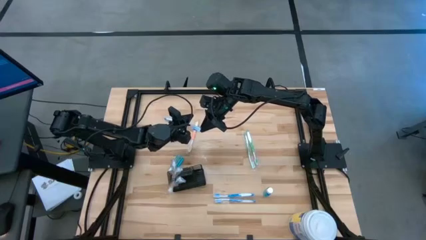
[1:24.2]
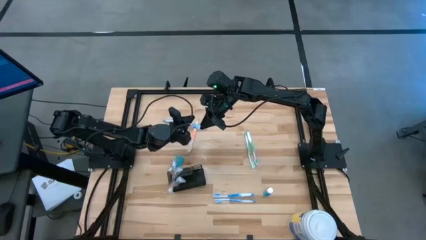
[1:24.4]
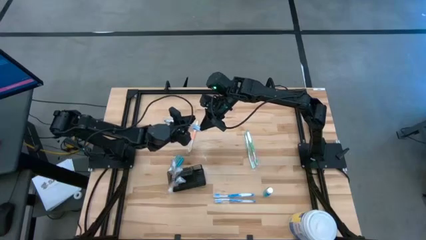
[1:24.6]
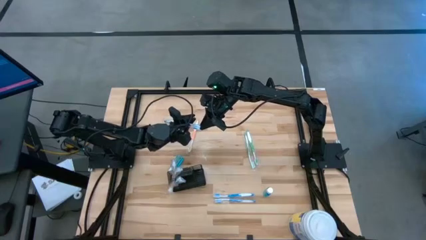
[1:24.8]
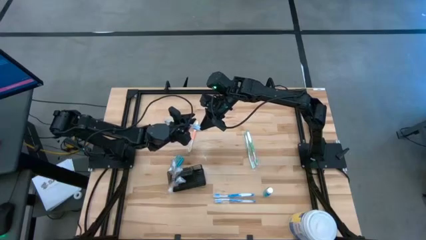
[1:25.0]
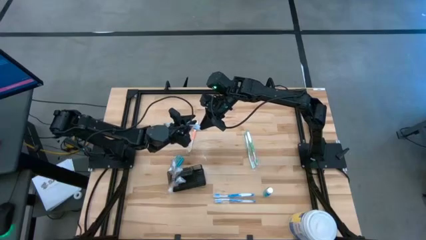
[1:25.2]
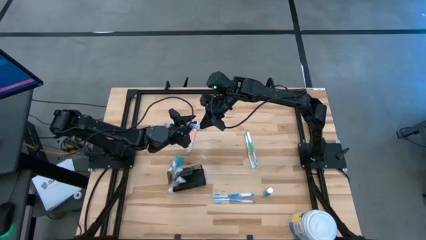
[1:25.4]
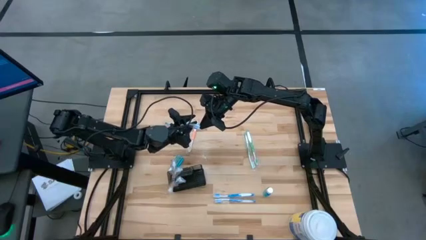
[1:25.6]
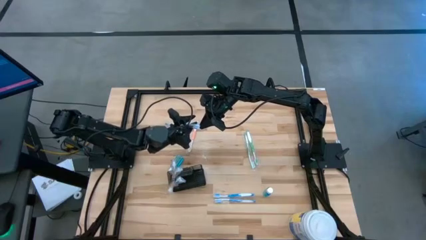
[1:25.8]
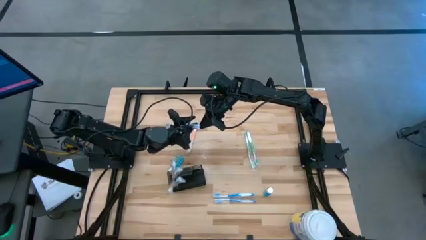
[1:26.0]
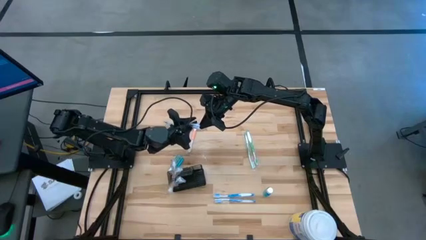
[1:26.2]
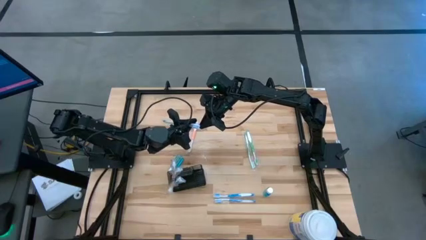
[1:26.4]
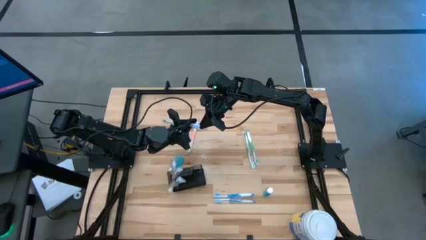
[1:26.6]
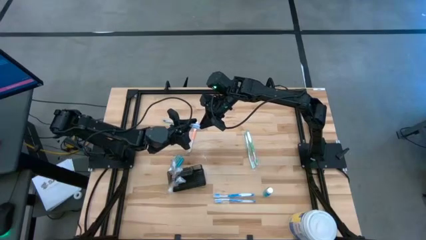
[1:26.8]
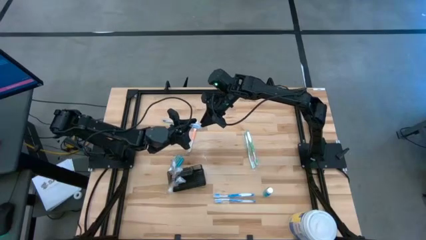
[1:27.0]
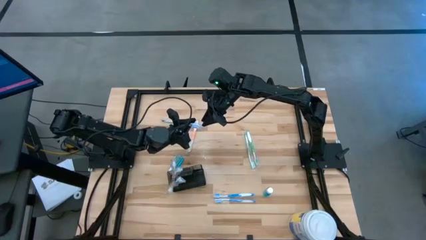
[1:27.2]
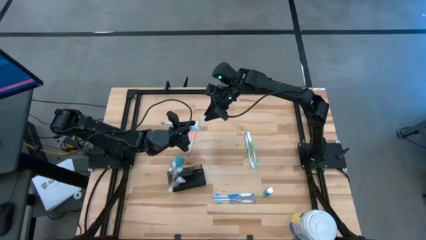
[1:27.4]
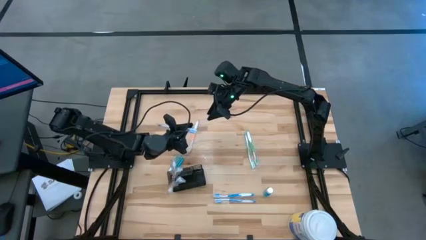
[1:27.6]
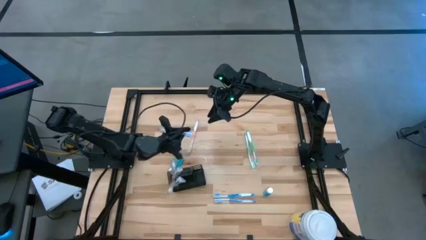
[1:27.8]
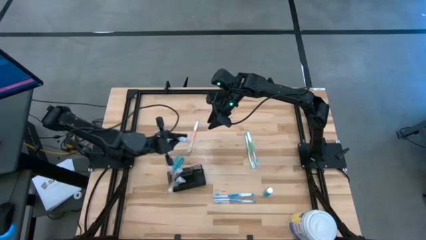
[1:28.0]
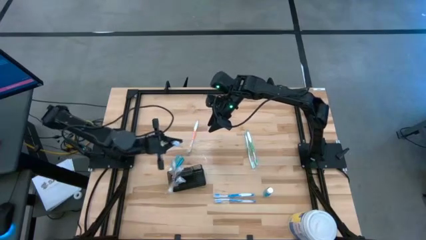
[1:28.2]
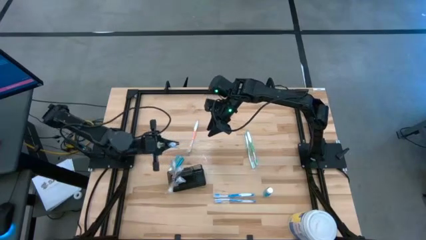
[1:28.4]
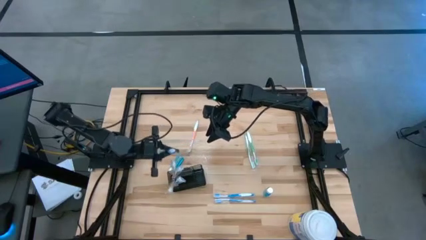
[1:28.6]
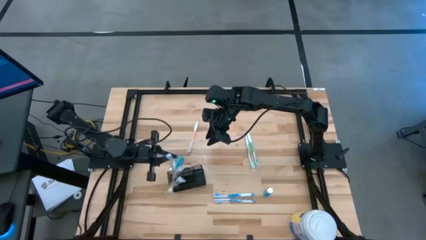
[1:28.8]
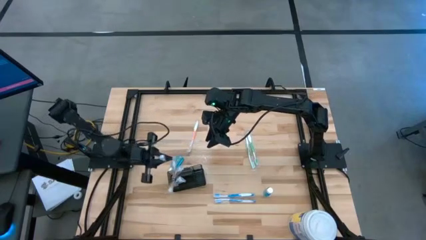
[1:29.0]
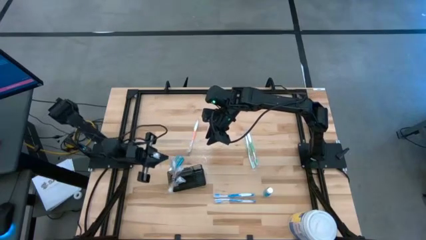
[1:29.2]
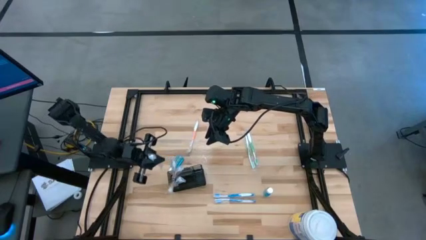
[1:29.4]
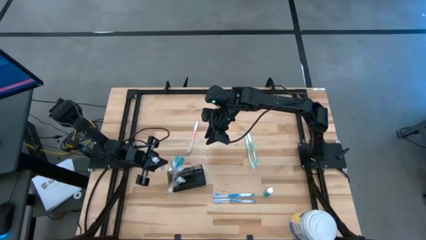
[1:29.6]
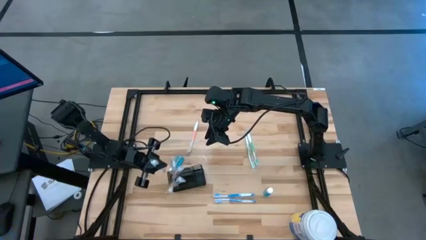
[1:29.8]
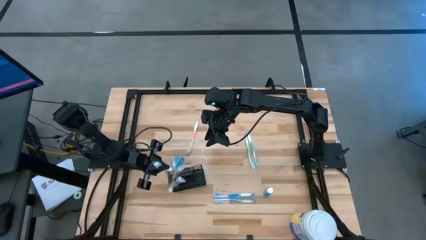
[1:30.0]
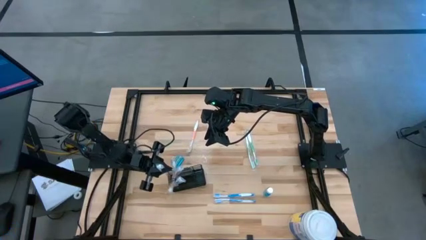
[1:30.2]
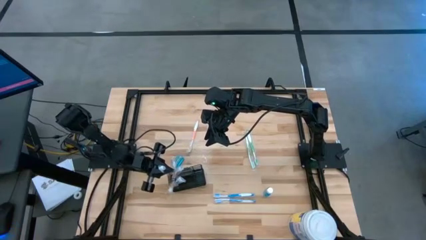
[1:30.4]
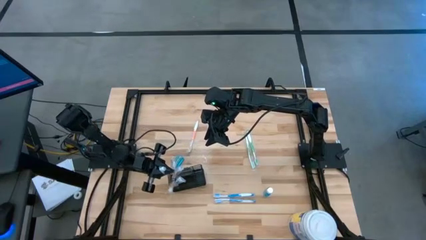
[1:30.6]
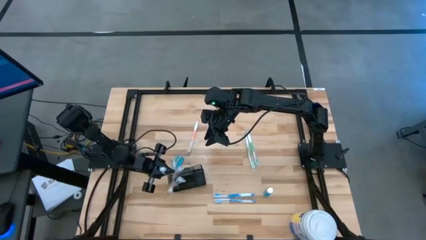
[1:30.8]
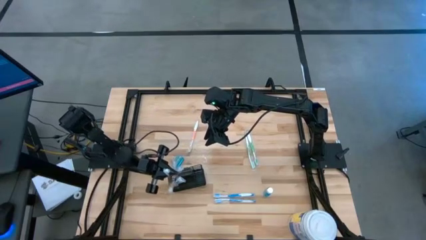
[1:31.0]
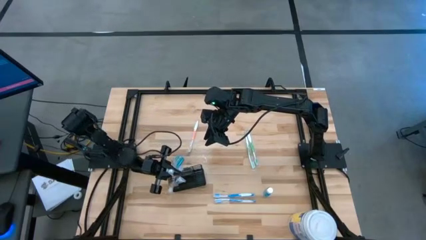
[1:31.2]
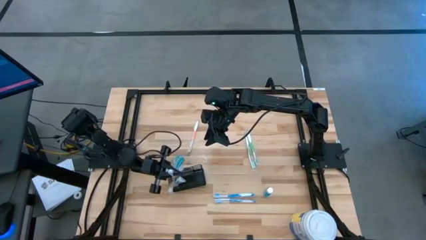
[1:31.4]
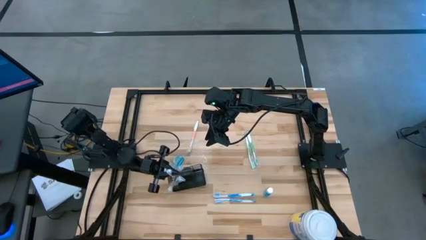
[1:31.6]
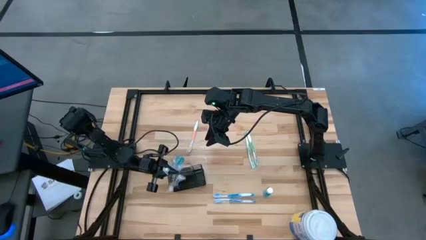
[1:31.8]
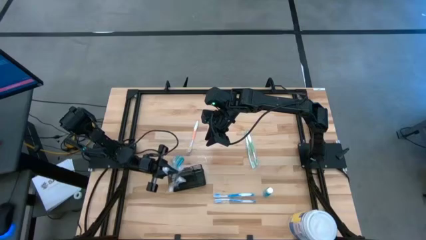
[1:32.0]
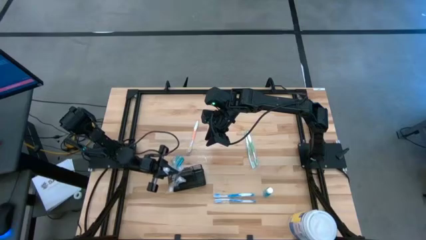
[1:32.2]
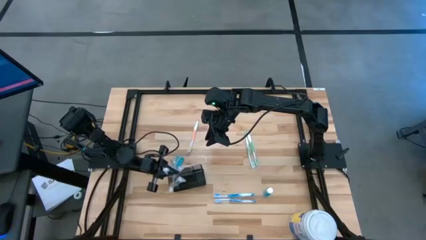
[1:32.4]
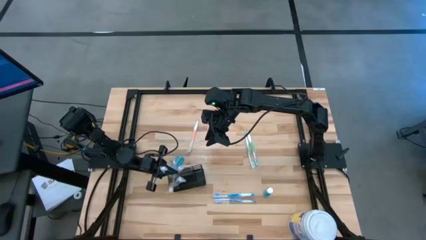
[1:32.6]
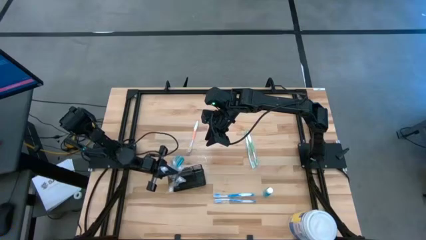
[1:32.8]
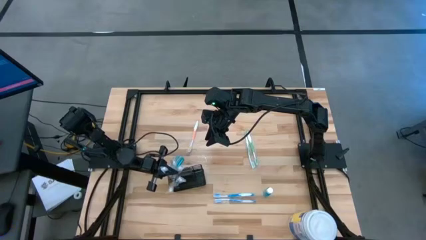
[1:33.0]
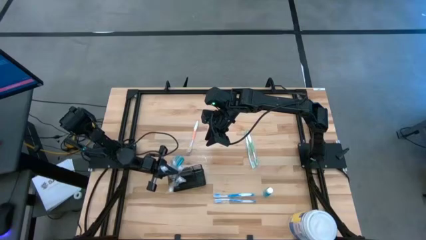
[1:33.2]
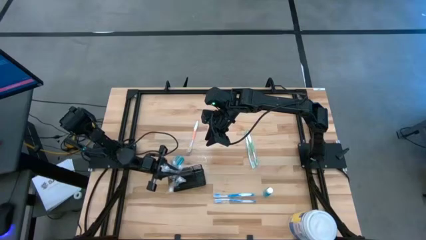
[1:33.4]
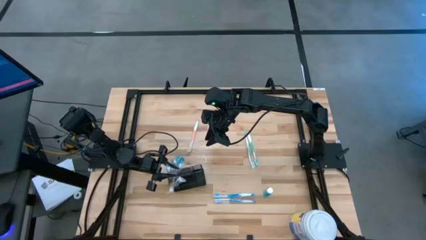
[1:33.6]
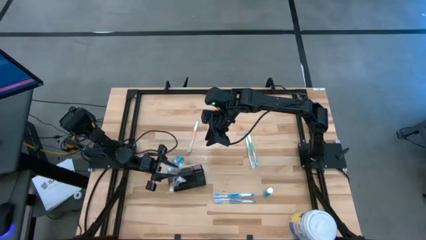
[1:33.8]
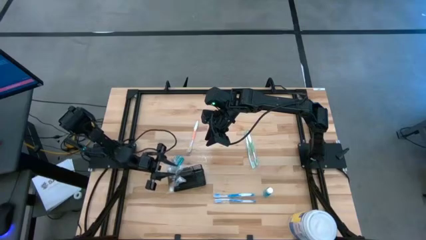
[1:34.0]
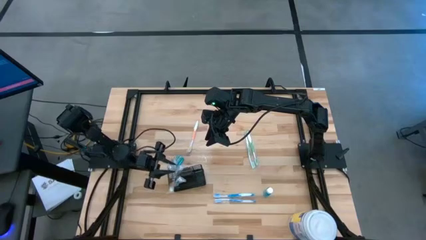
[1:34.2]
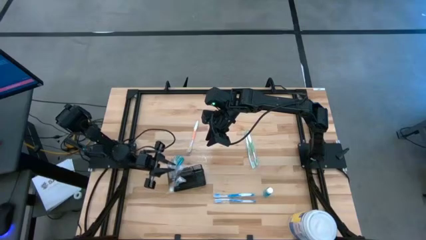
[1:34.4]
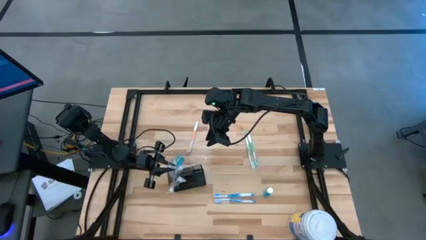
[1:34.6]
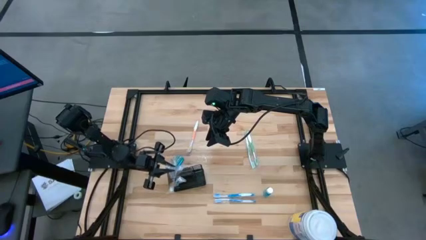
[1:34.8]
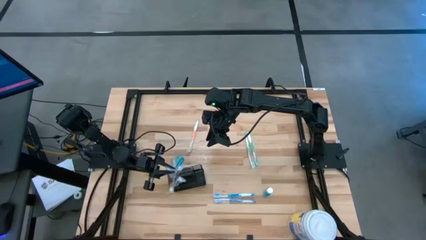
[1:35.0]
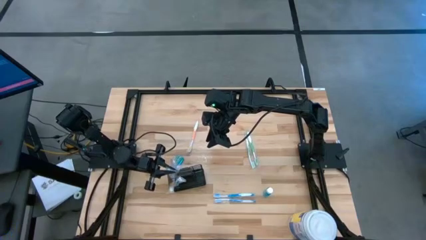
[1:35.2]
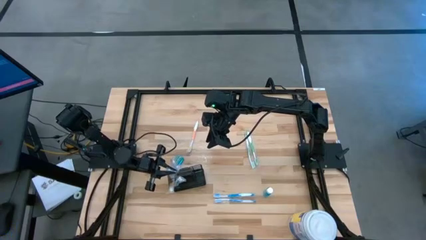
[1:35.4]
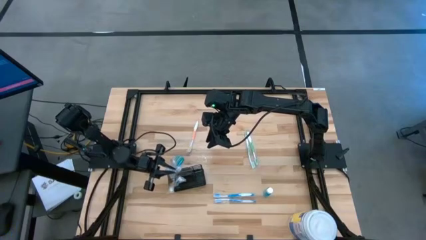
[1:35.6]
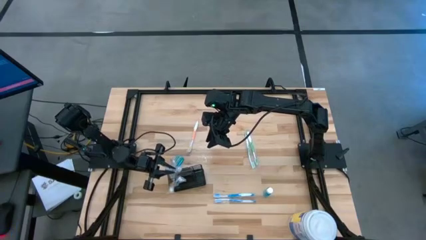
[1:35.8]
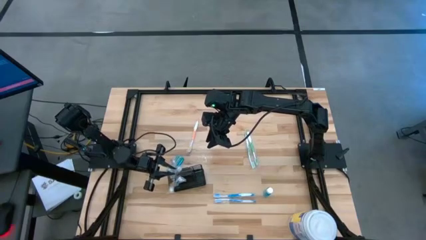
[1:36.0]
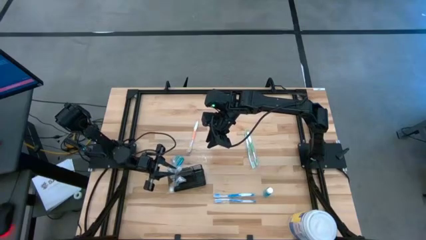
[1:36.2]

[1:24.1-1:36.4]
Task: Pick & Place toothbrushing station
Put the white blue toothbrush into the black toothbrush rack

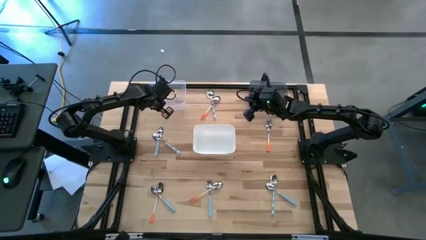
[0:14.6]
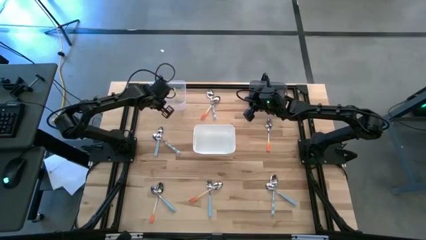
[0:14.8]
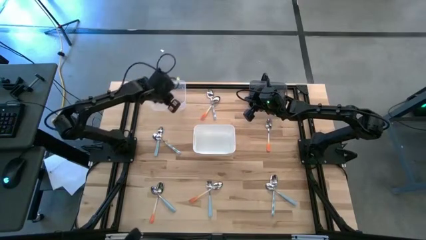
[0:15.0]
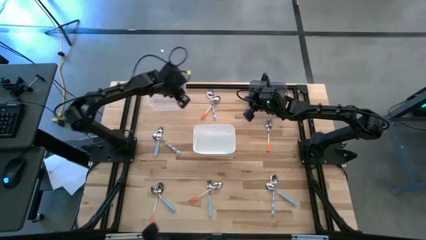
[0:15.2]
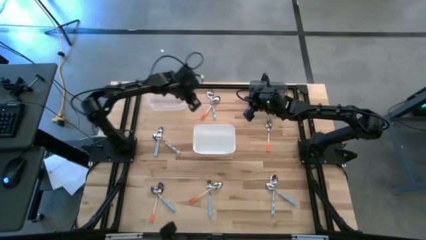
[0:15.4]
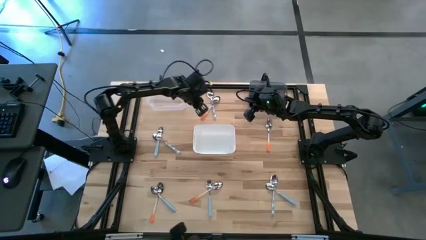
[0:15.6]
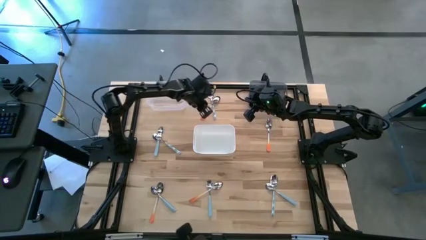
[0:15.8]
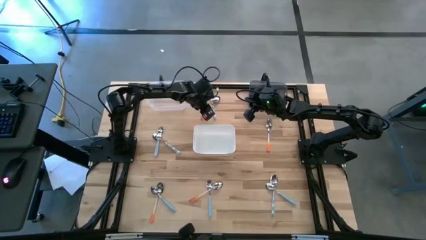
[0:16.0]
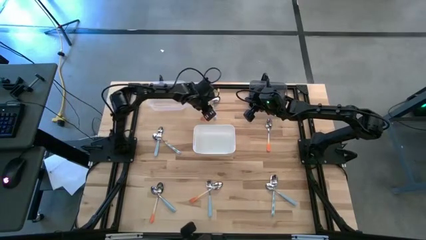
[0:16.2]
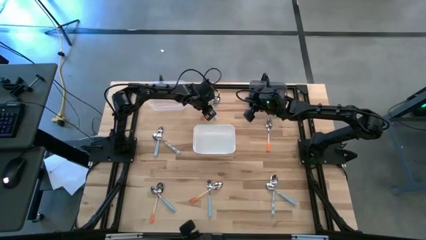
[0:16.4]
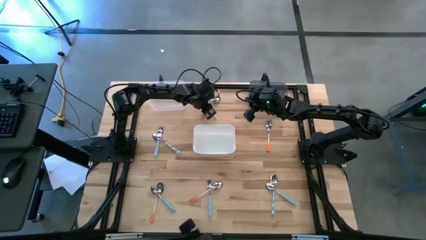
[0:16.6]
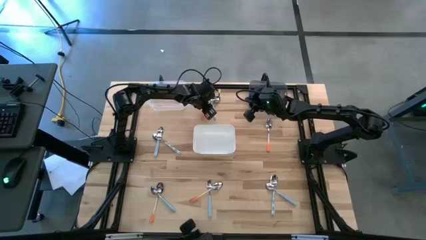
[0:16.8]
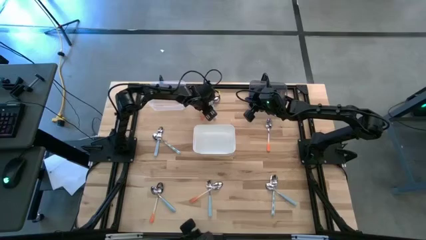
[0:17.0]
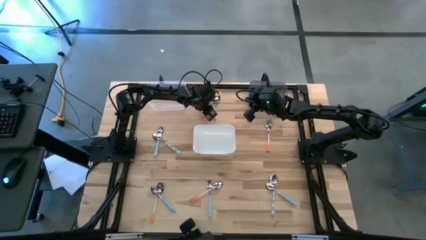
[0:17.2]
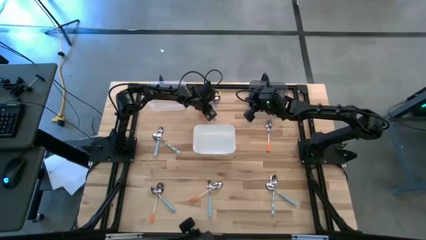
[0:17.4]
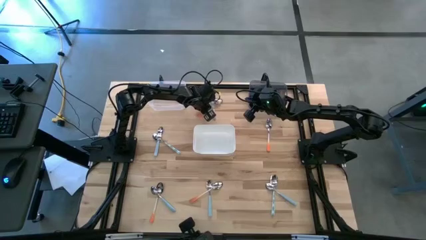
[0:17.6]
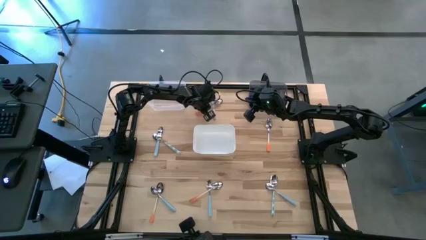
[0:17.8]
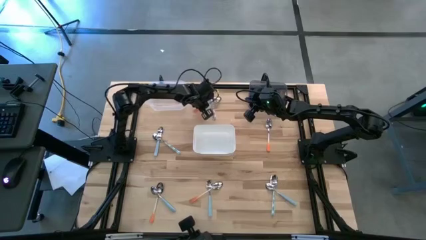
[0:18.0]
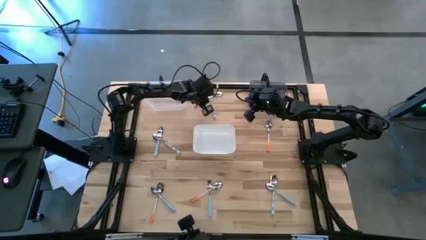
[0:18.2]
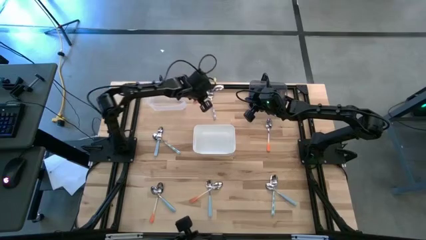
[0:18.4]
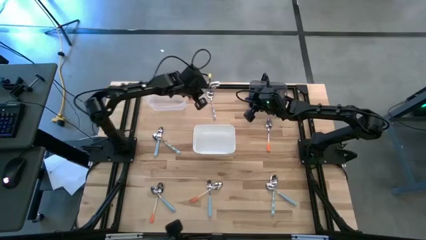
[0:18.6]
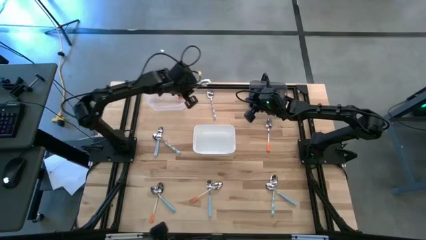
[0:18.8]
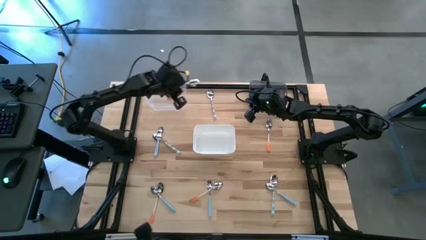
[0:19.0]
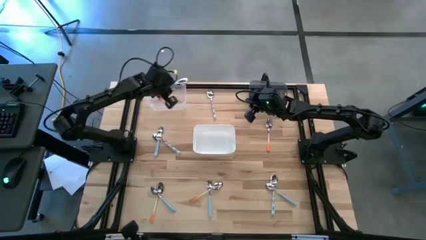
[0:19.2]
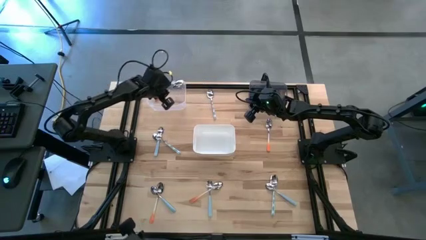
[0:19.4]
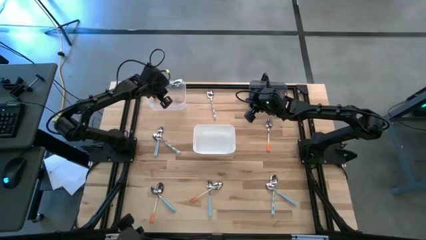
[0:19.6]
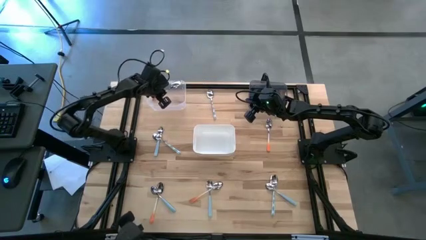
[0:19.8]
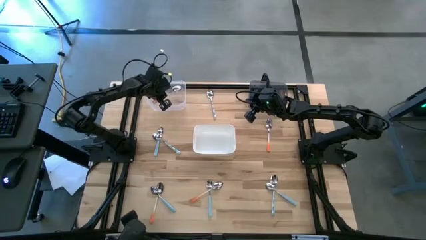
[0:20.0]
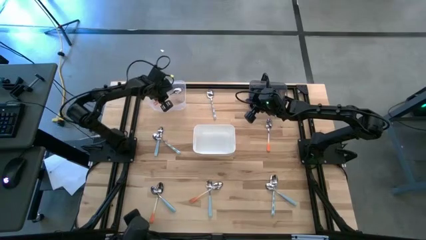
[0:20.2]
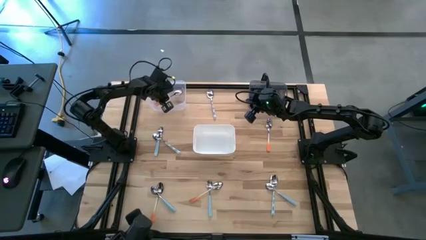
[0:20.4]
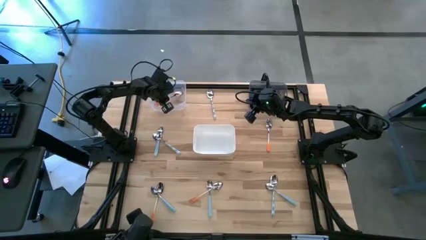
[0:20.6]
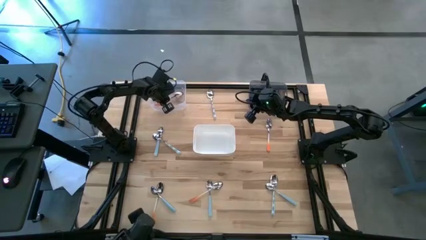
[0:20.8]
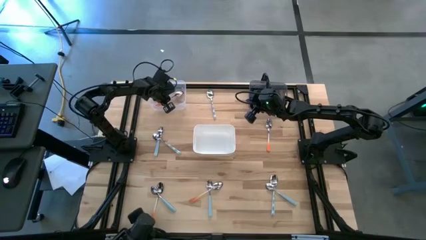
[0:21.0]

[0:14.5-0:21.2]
Task: Sort silverware by color (type)
Put the orange spoon into the transparent bin
